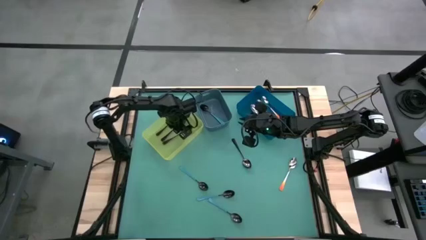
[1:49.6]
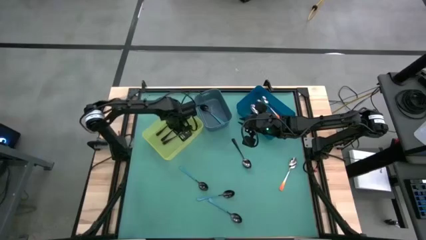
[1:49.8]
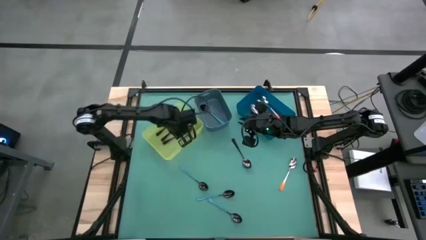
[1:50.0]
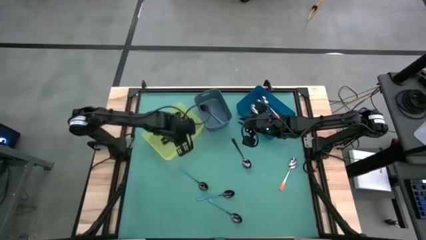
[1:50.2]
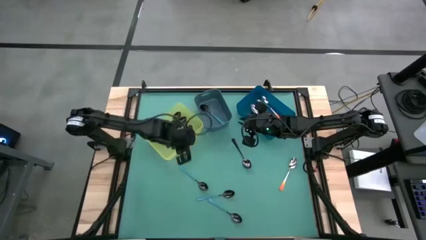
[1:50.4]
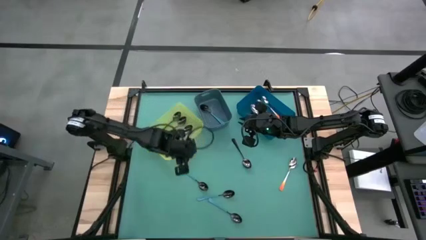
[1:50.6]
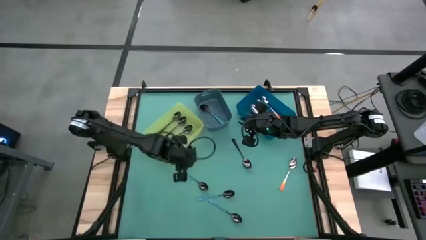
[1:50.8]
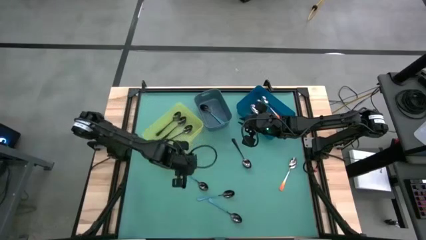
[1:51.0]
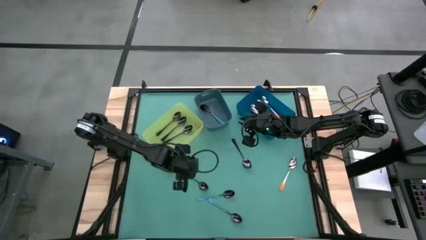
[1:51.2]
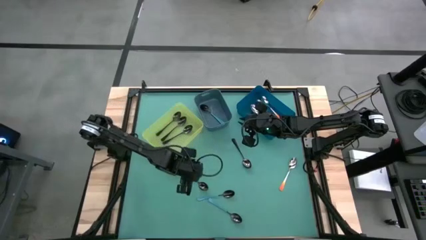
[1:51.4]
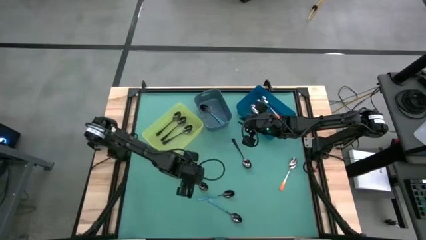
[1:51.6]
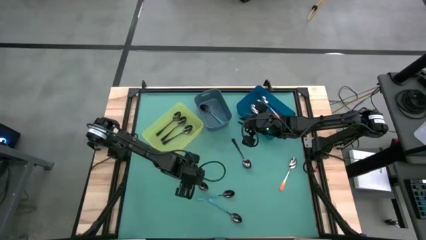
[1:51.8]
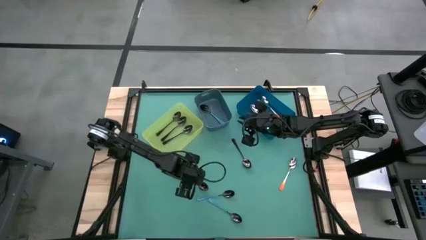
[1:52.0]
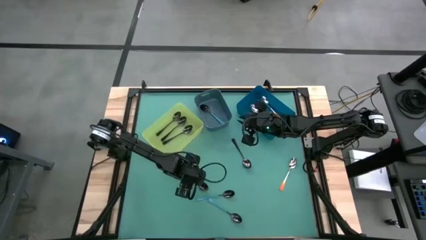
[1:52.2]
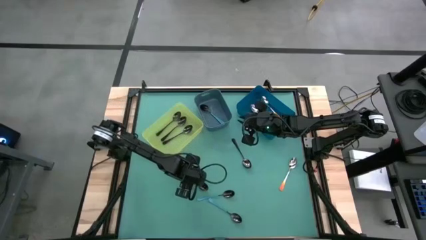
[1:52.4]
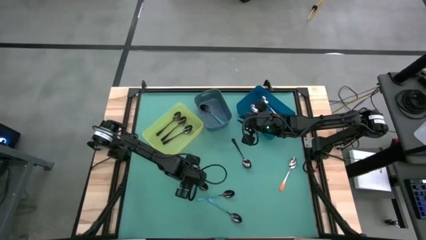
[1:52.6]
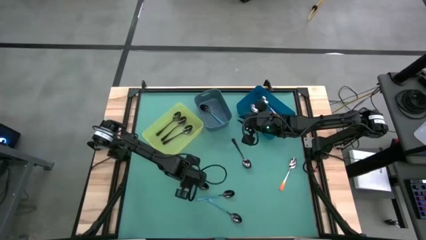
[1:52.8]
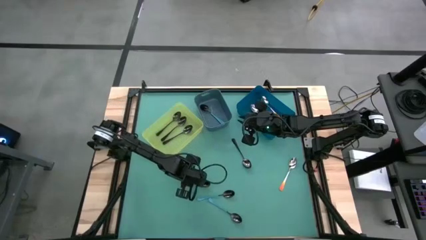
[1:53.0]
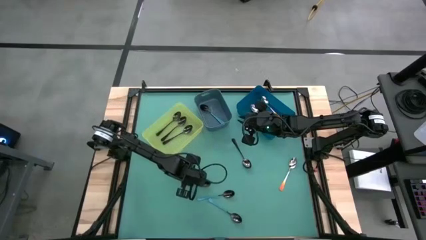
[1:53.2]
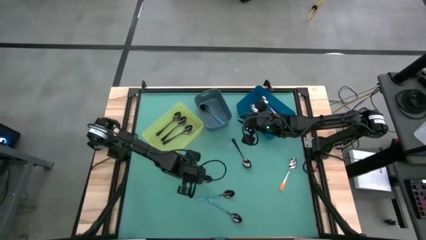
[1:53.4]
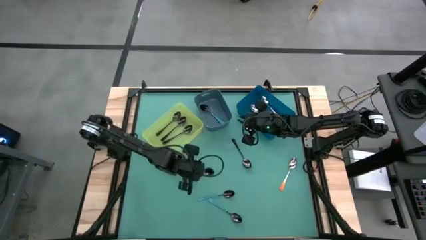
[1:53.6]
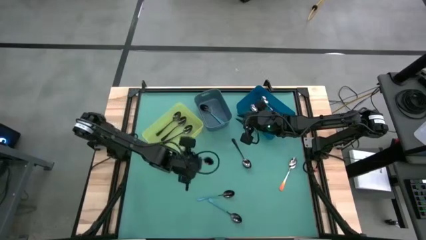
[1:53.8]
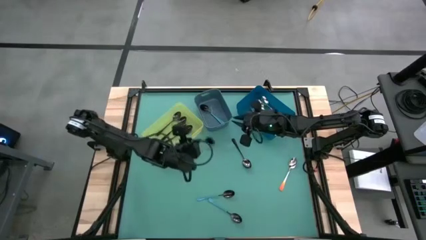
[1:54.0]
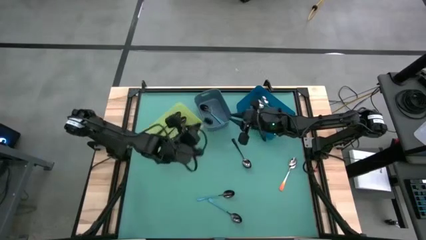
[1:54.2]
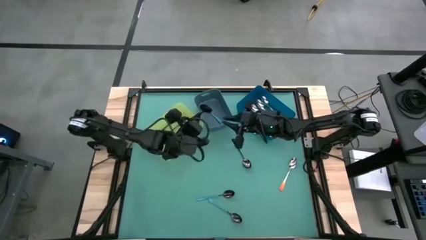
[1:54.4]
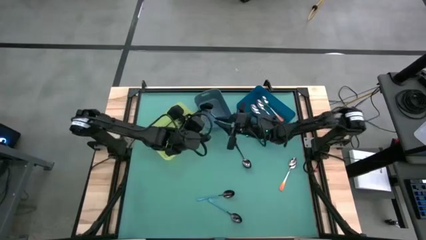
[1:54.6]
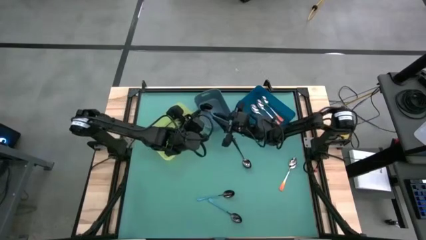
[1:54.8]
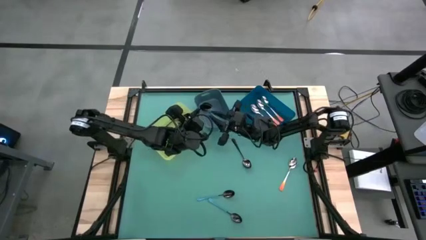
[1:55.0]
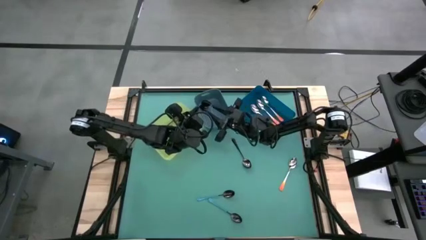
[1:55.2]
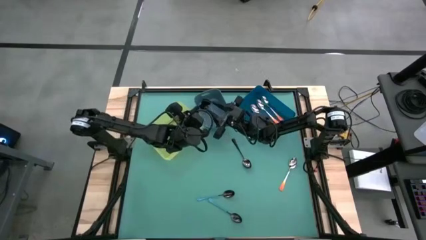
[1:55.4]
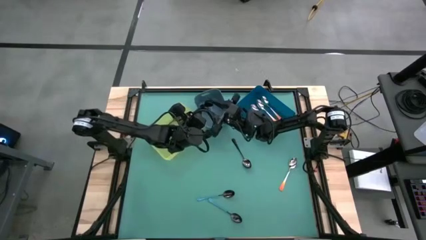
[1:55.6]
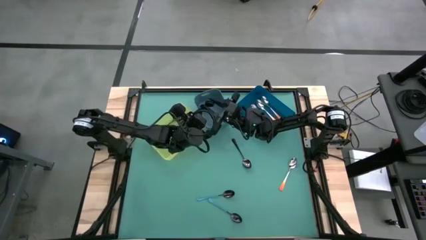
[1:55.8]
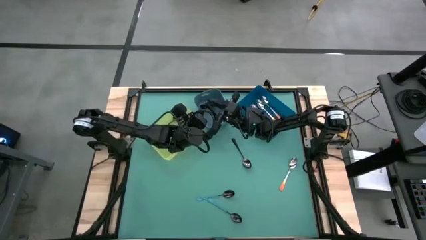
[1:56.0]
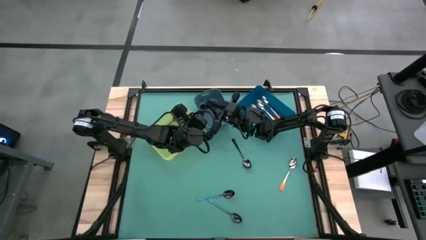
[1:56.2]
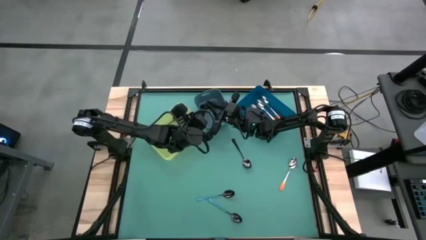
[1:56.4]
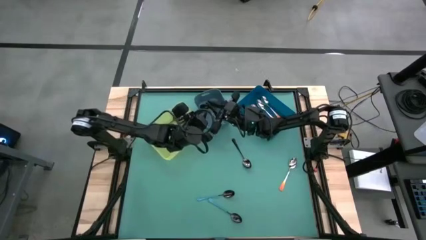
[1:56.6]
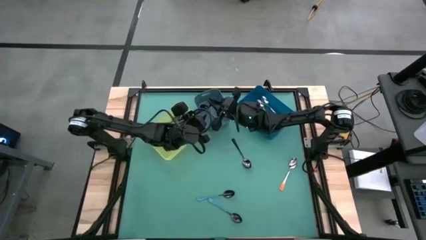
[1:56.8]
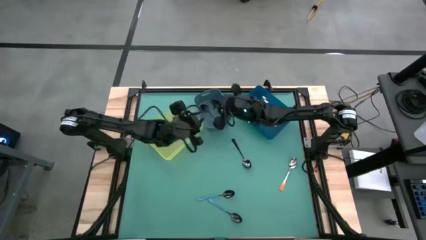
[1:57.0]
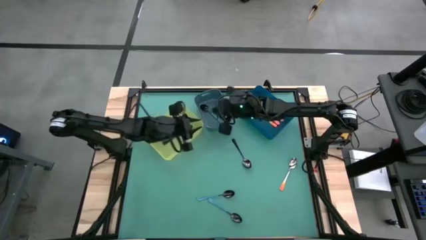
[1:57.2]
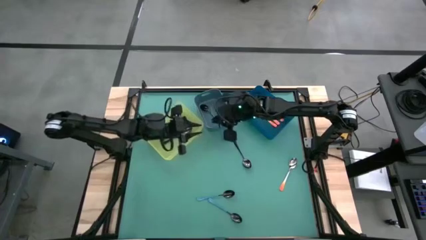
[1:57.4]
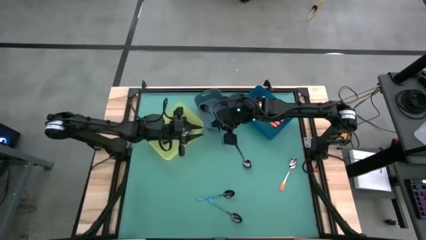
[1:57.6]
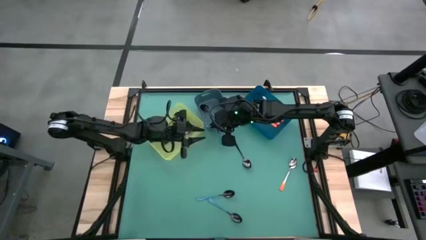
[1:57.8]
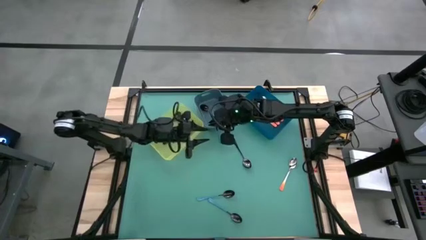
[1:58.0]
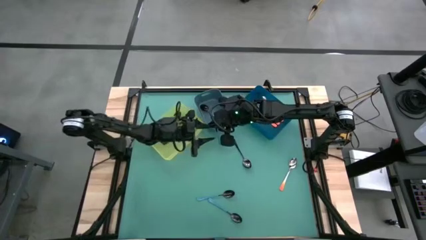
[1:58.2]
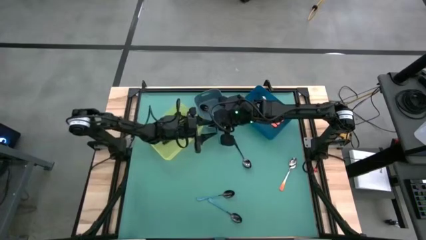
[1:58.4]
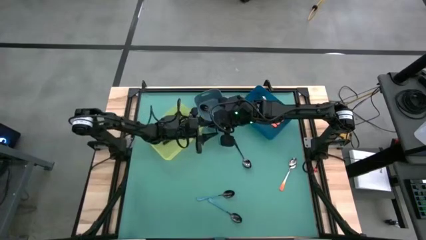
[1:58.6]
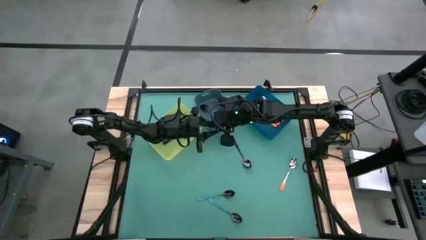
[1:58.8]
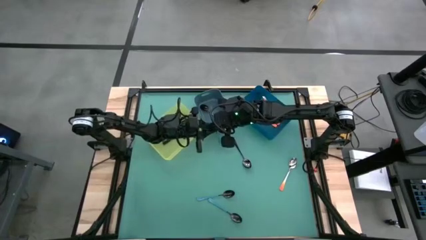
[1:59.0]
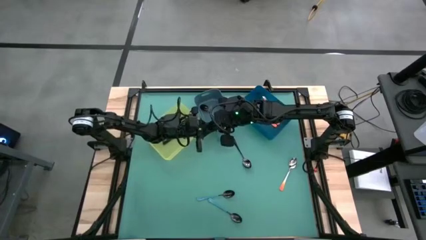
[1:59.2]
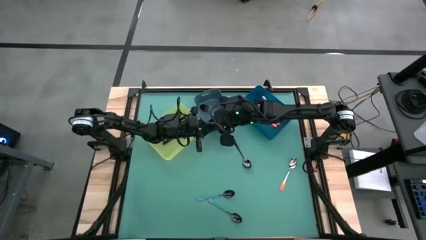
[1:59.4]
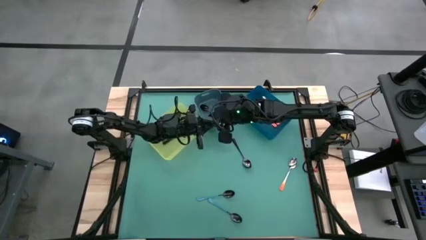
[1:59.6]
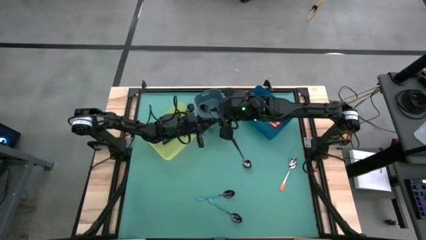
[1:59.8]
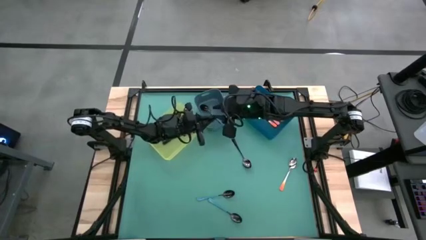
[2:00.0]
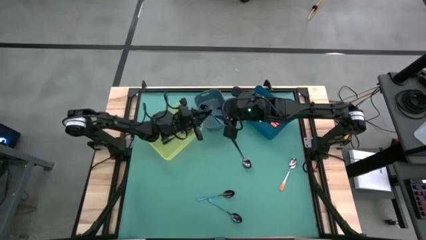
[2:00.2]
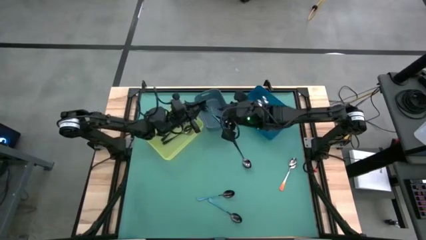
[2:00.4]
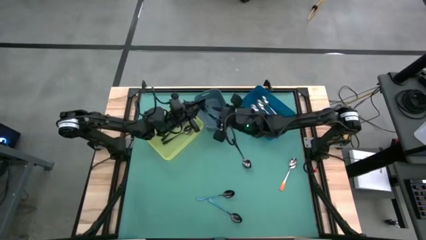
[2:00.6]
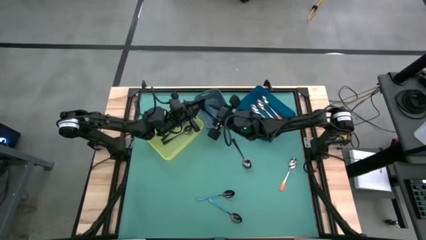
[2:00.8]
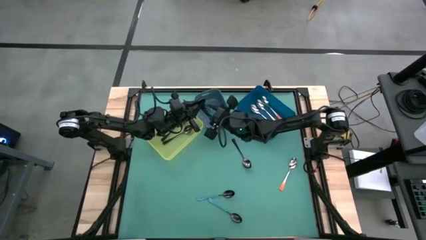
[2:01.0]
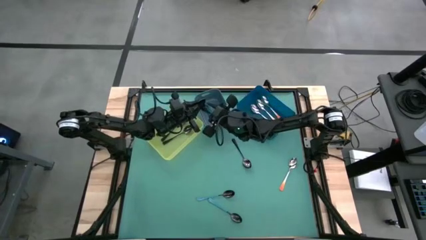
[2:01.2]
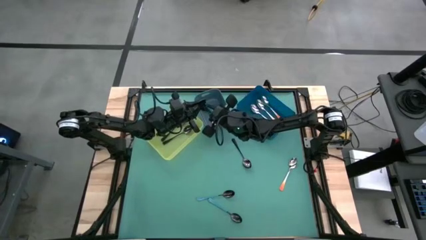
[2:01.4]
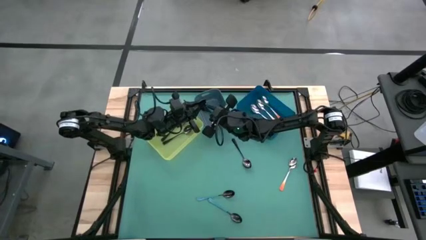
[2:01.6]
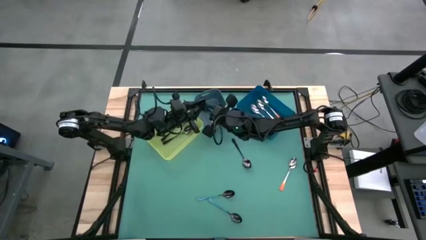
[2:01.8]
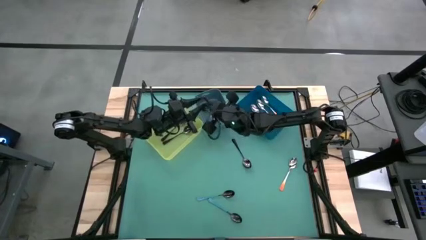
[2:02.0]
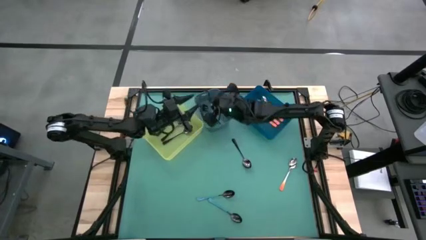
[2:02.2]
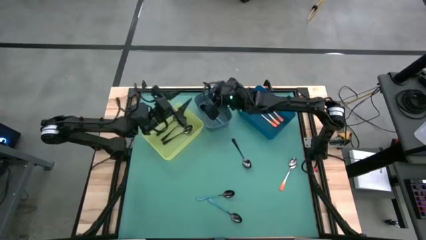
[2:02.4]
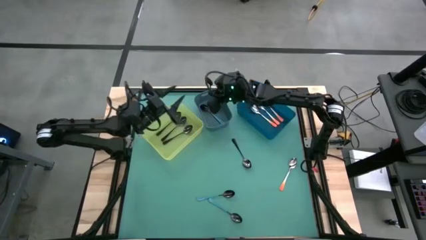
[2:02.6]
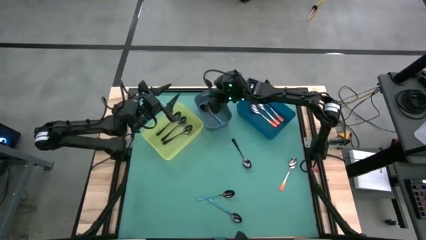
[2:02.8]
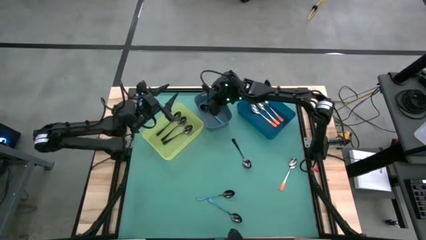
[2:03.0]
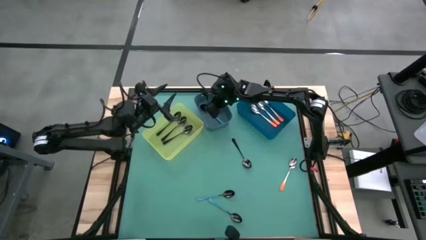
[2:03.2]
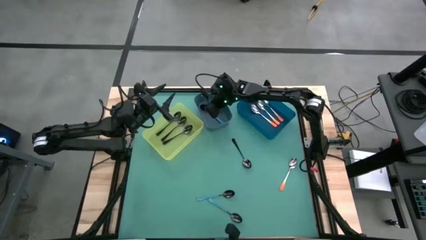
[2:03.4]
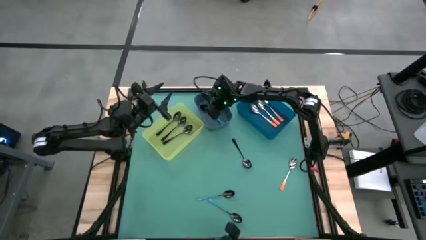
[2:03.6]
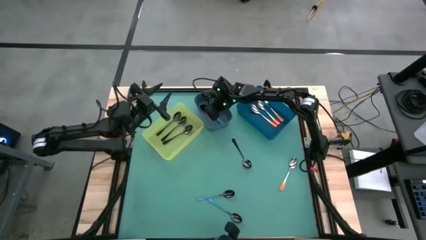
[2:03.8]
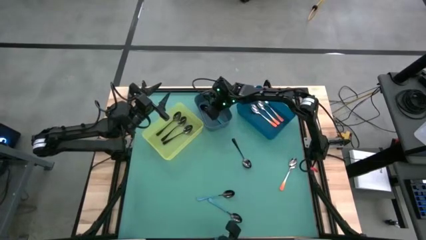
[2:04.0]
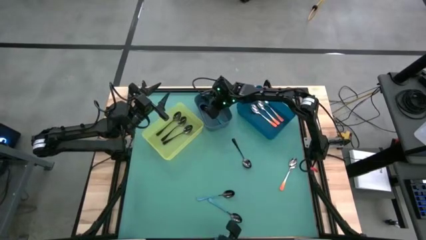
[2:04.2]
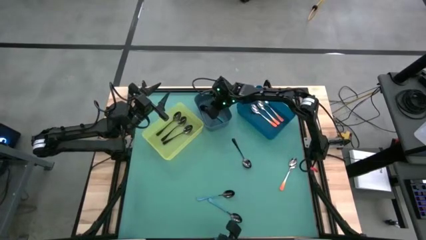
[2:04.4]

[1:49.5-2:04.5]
Task: Sort silverware by color (type)
Put the blue spoon into the dark blue bin
